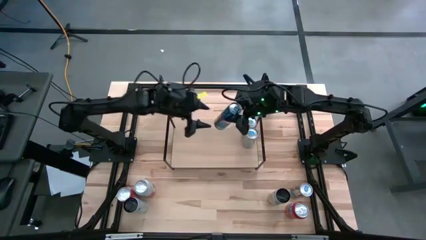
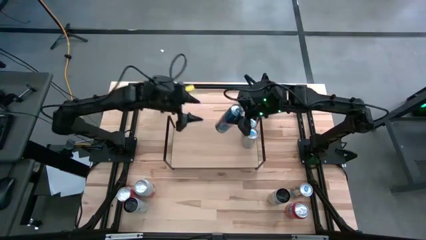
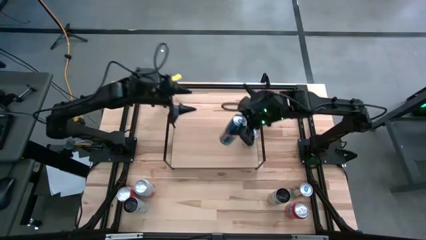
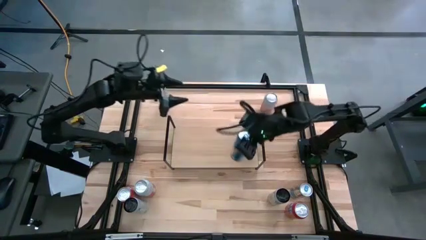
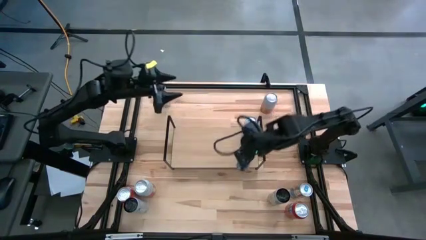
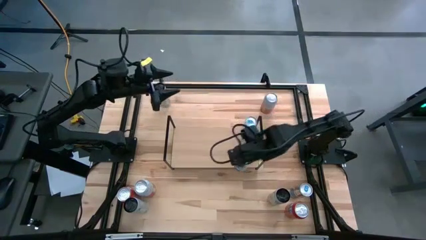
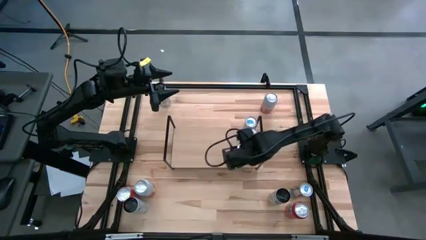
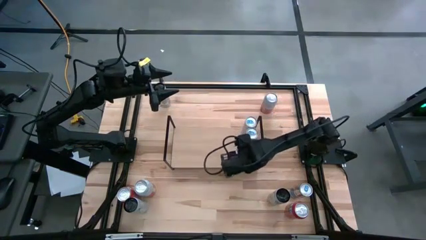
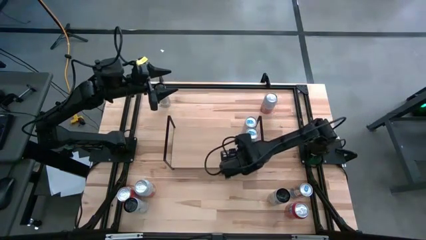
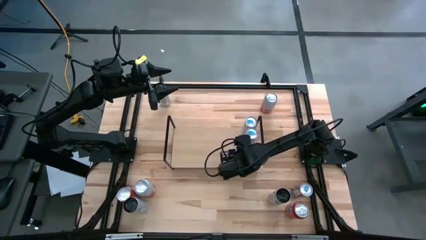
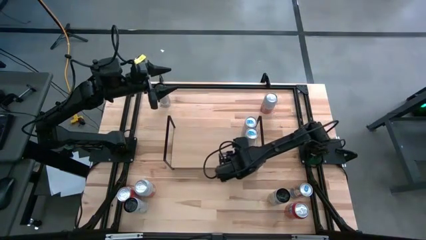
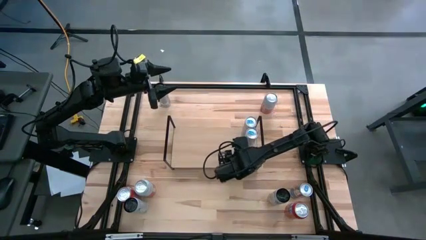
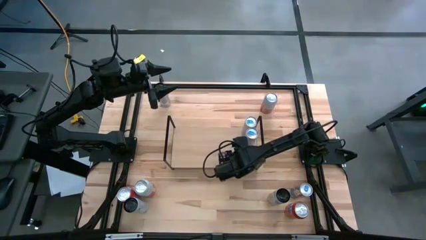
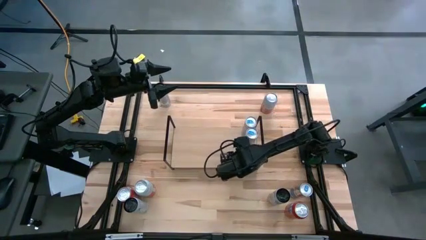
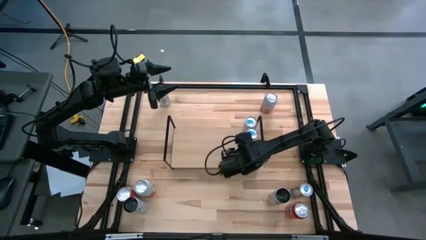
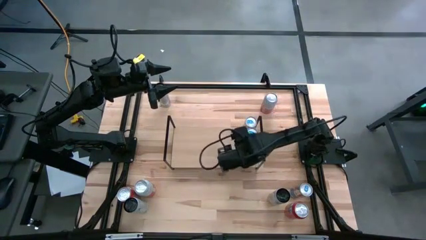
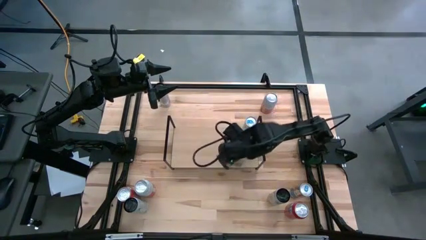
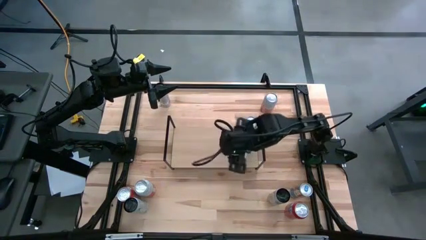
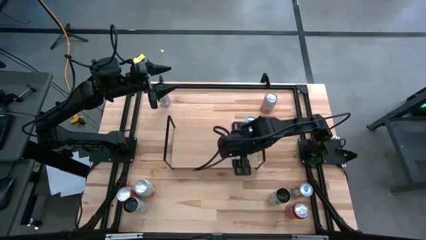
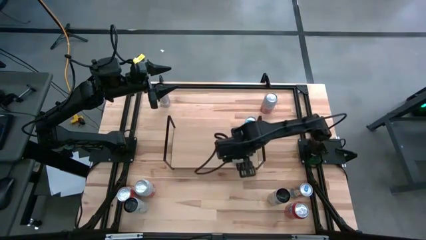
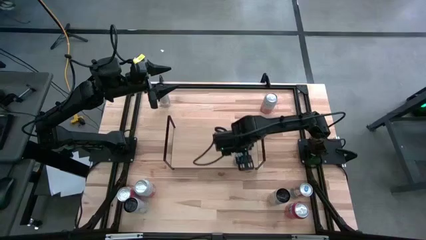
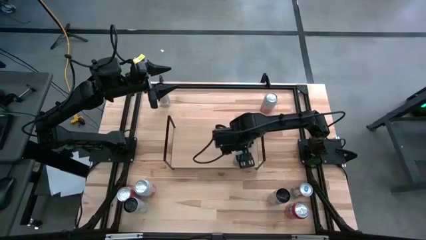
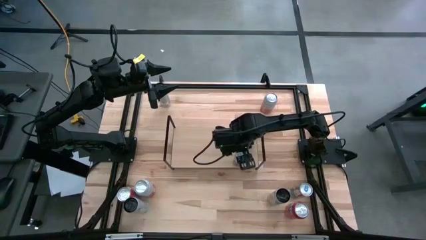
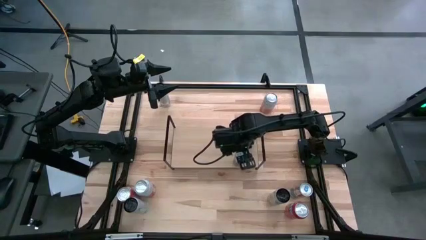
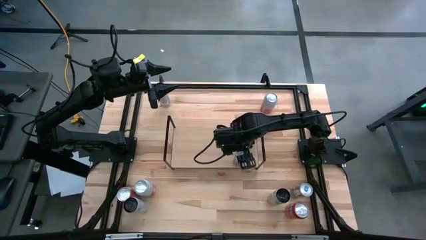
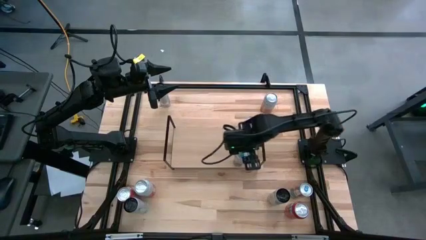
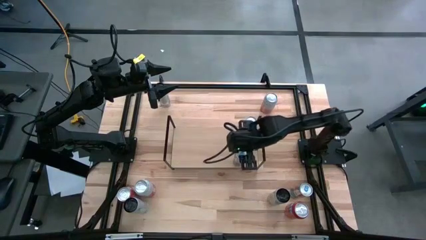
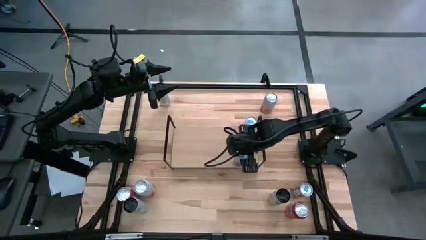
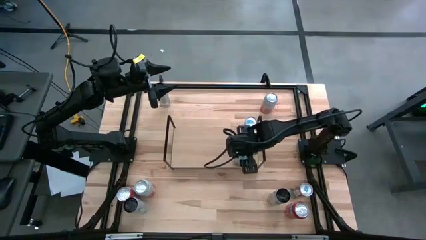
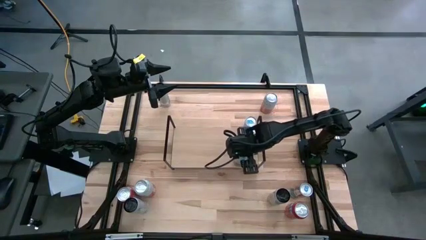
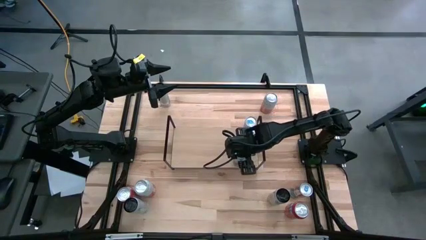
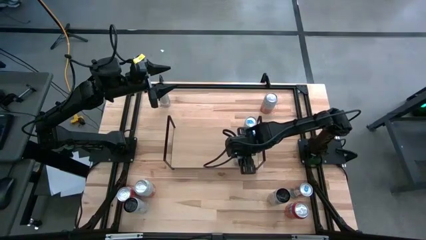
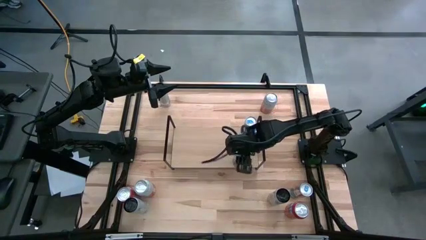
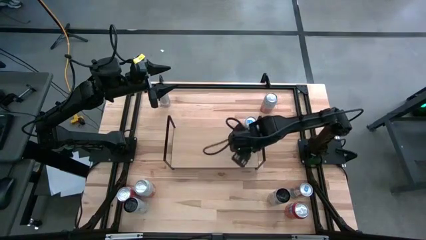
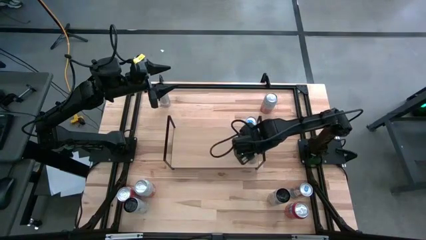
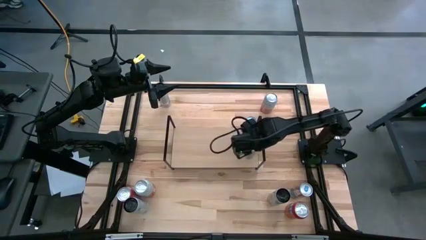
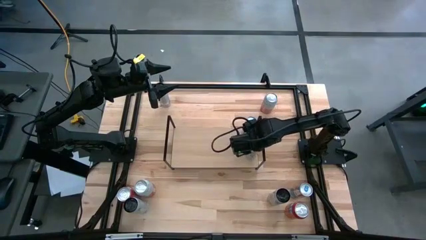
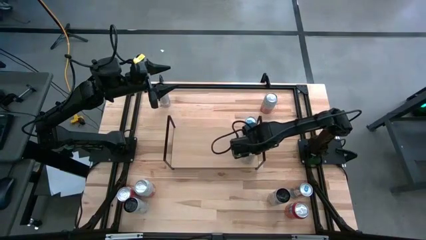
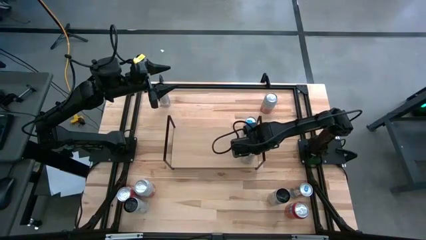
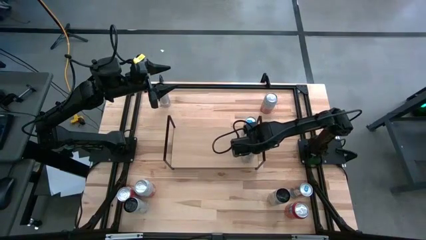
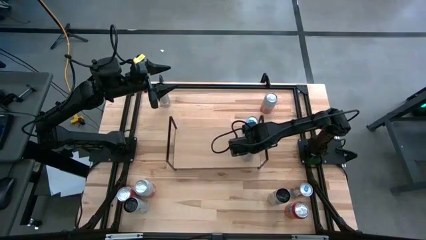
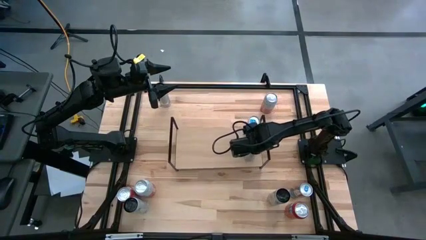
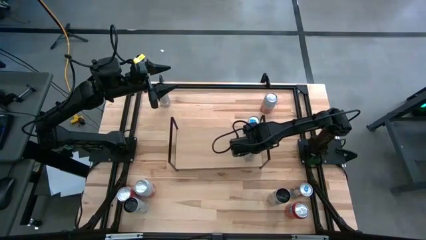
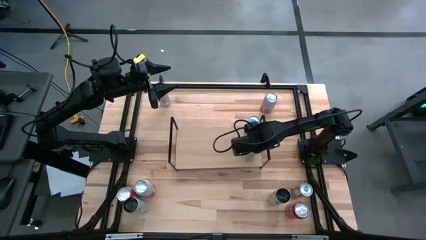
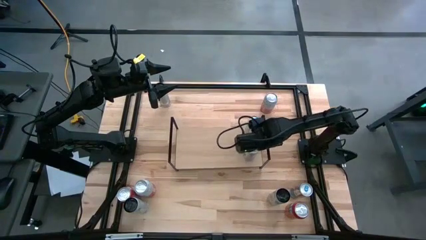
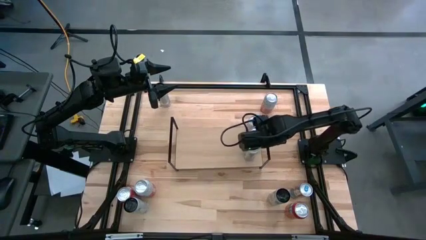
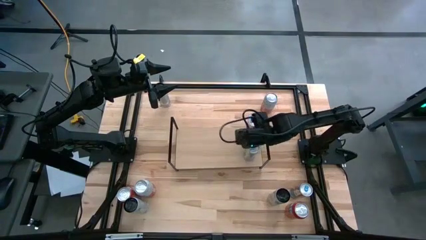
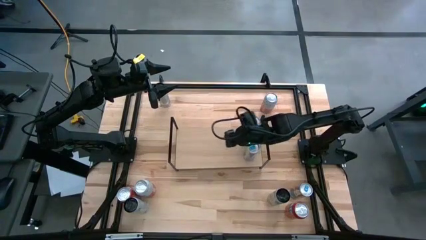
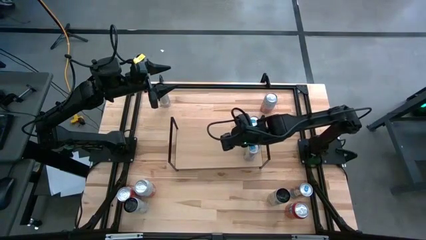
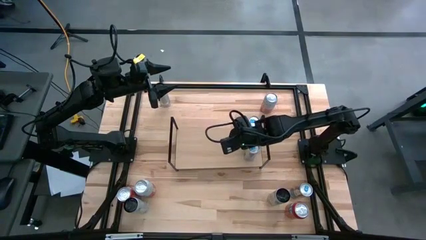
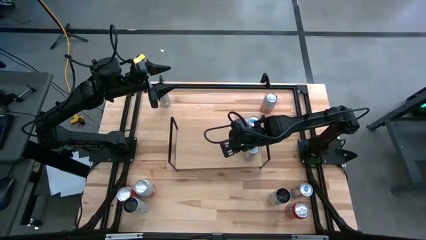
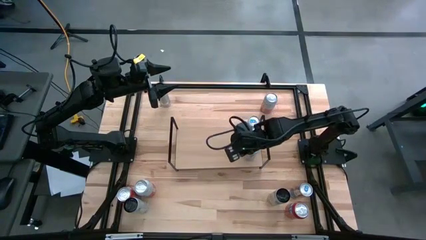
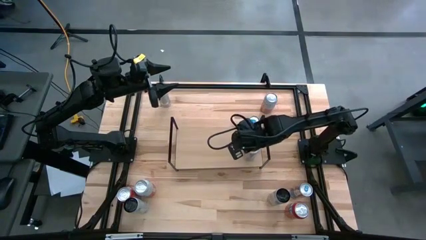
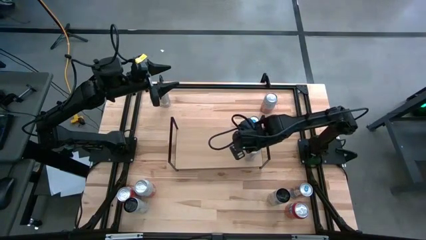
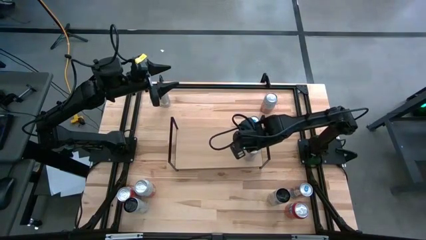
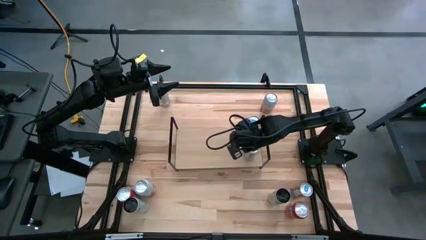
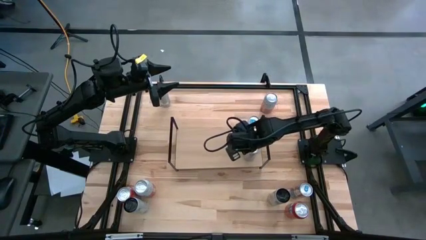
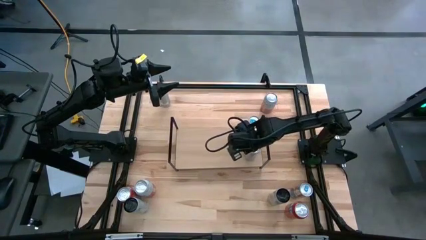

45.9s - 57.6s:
Task: Place canned beverage on shelf
Put the blue soda can aligned with the other blue soda can on the shelf
